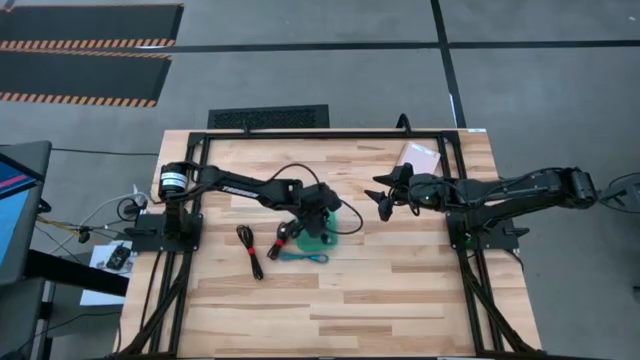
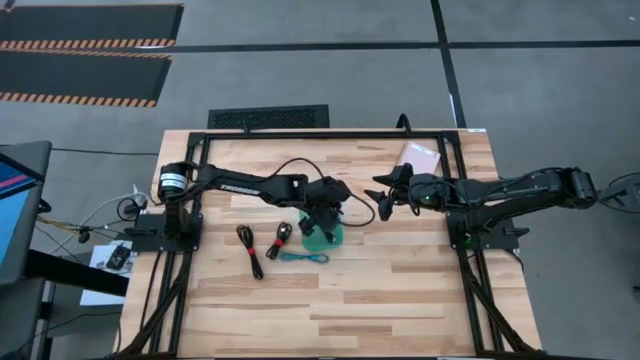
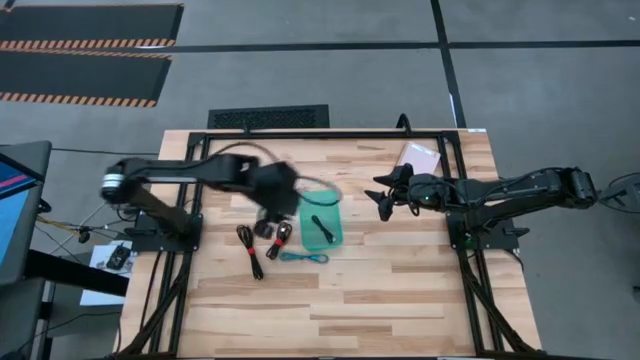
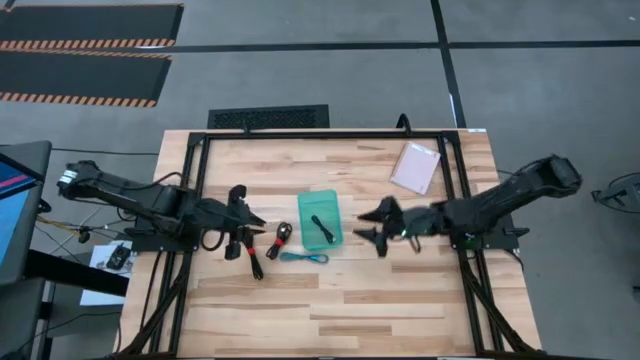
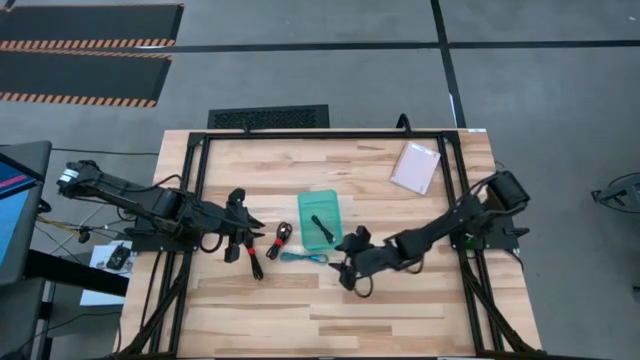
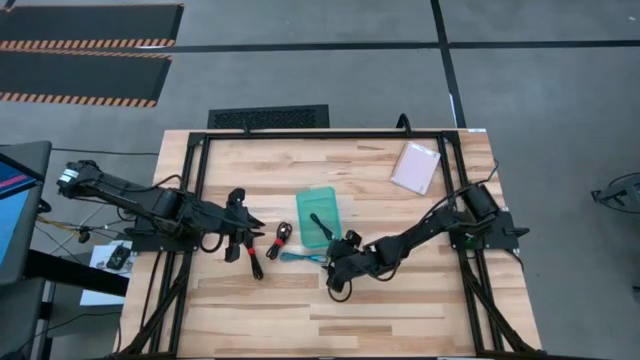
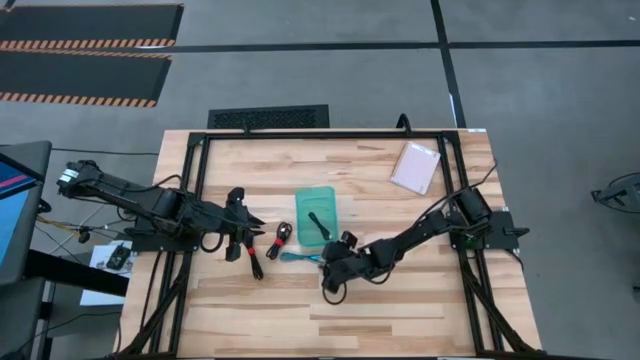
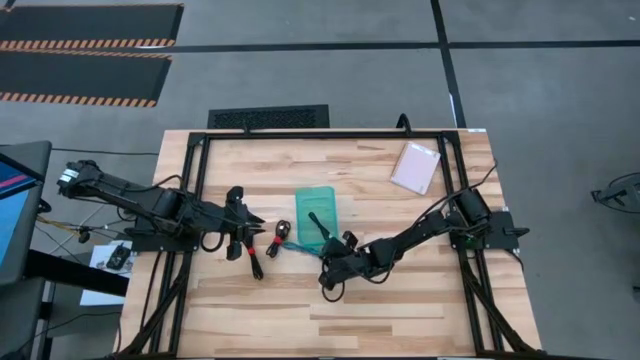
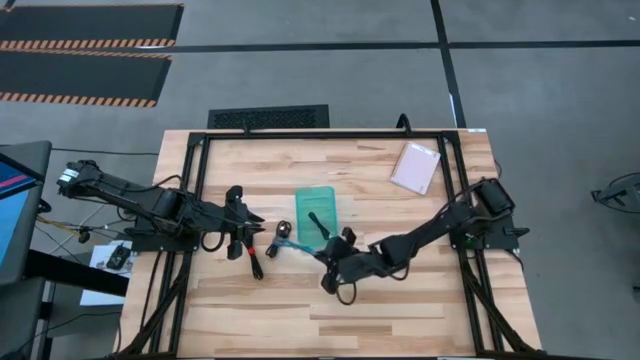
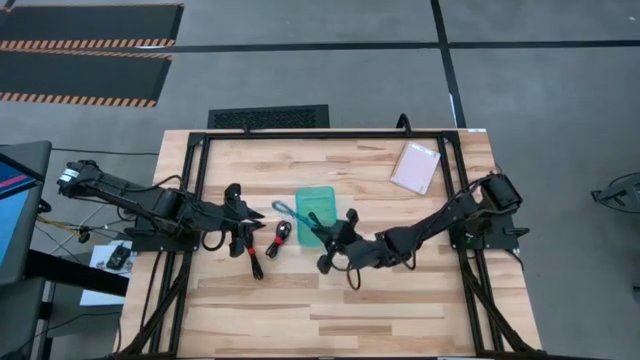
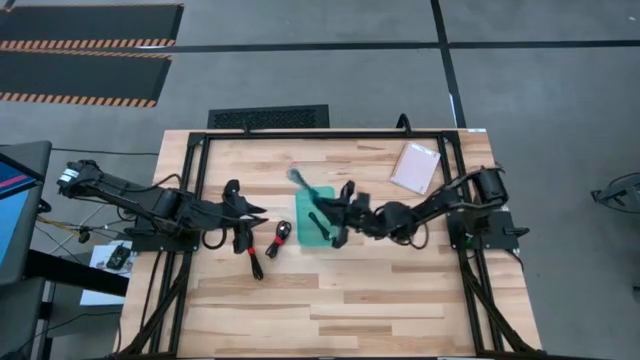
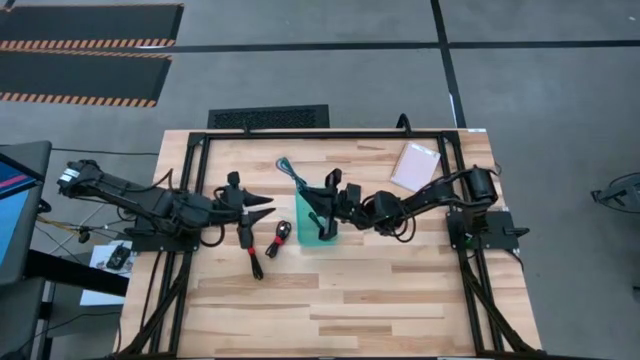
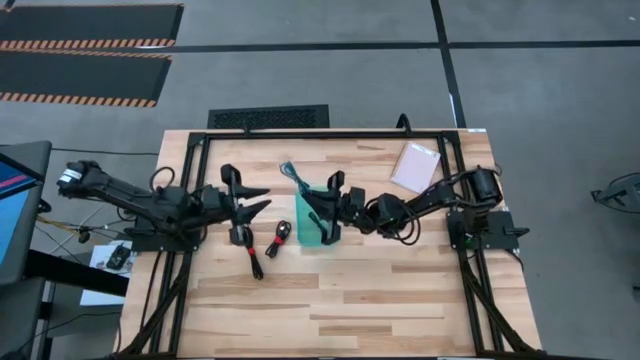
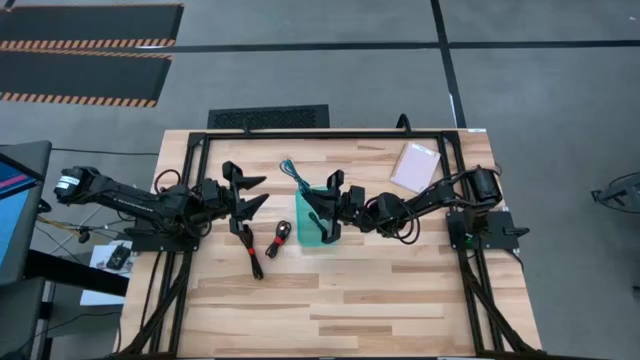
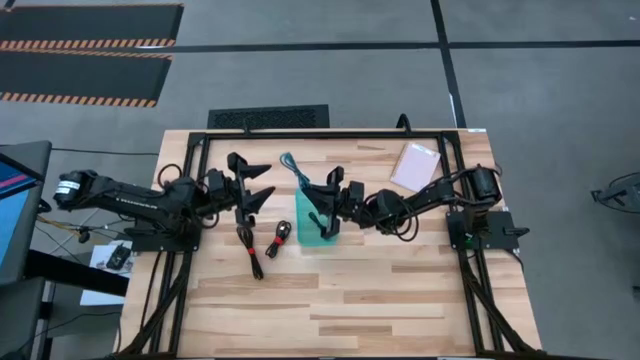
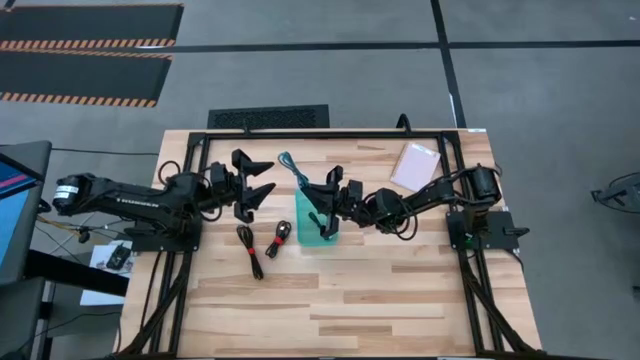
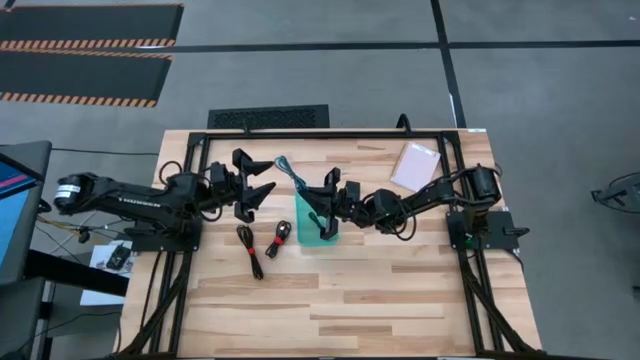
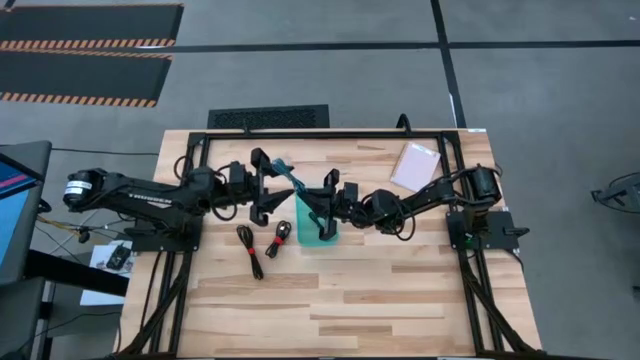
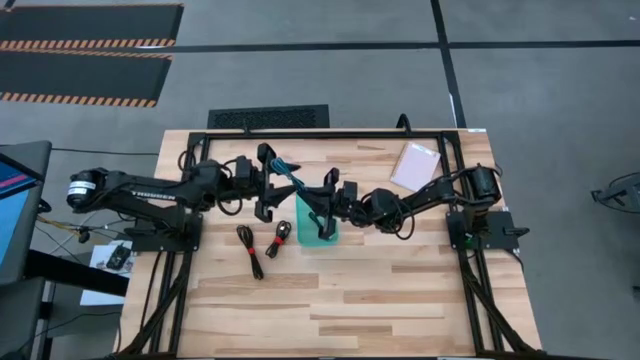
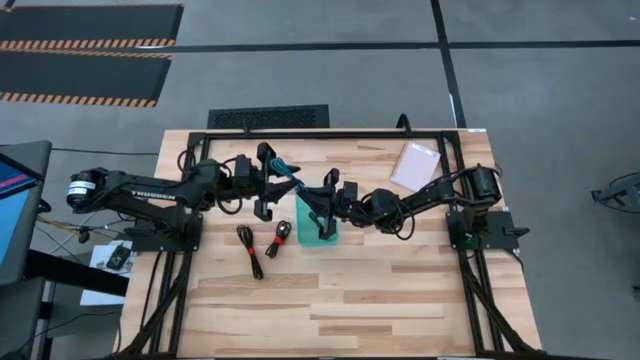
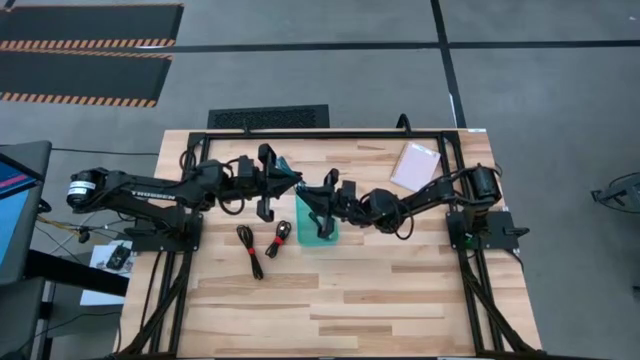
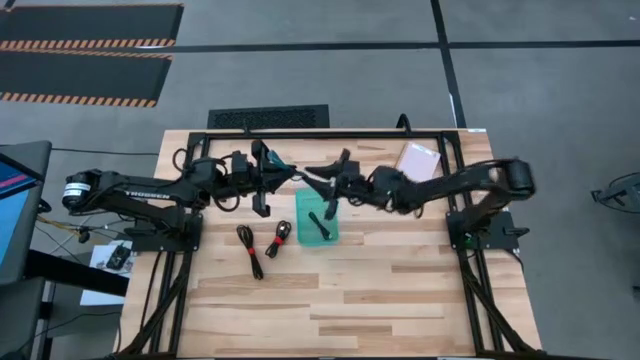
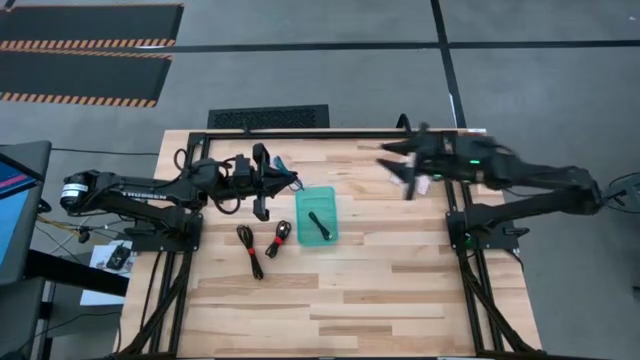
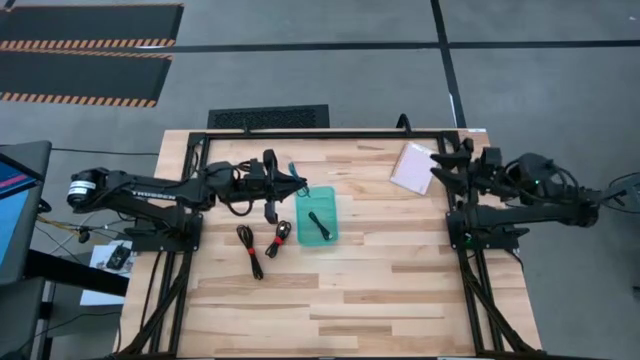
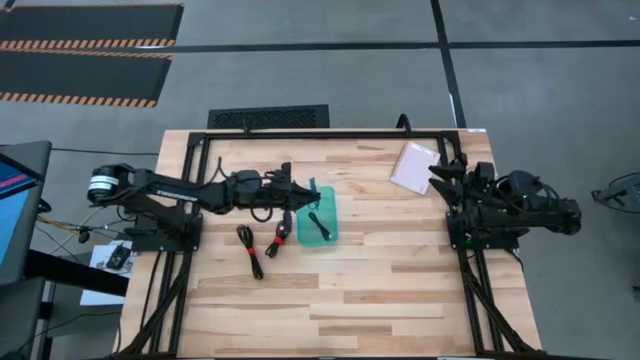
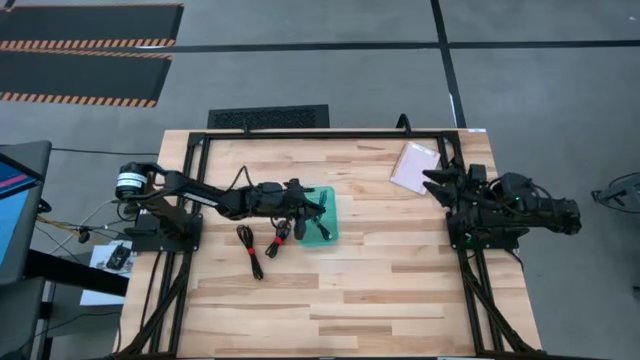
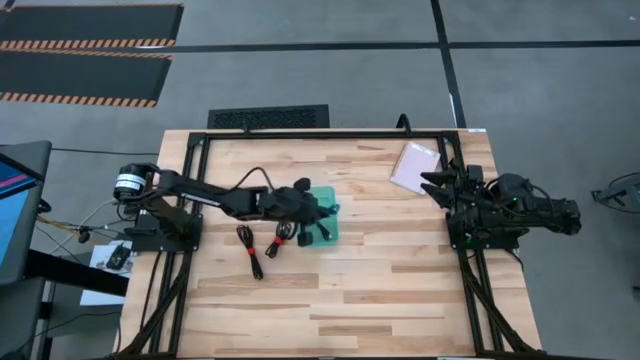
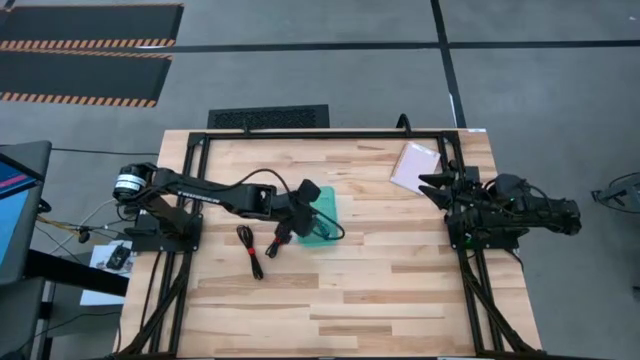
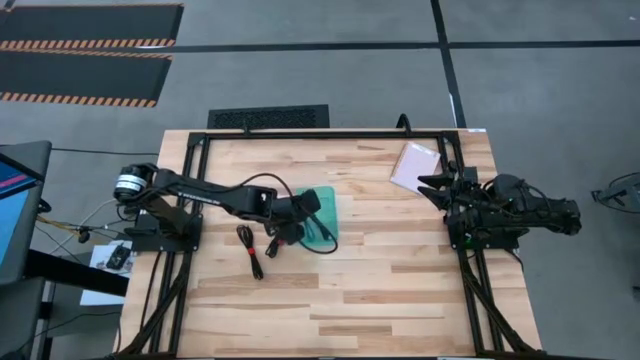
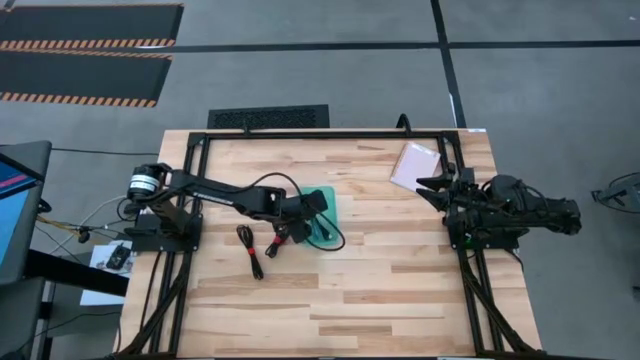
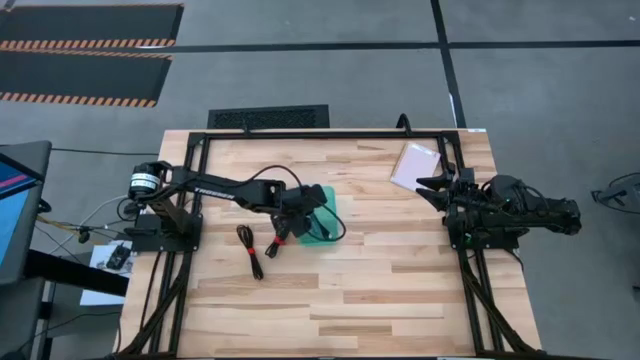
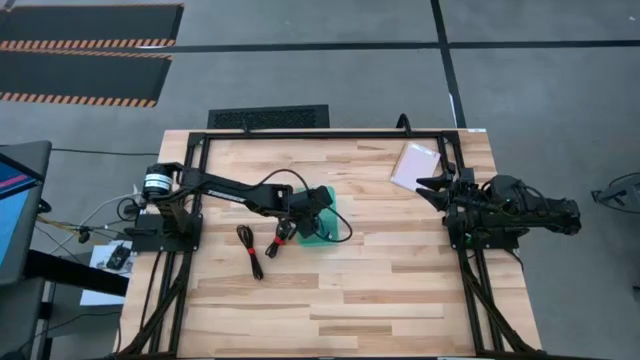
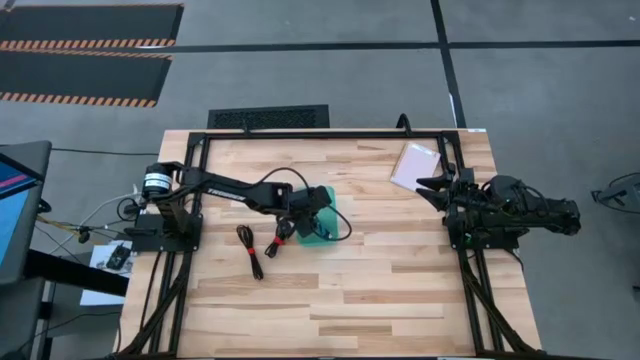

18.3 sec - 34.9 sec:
Task: Pick and place USB-C Cables
Put the blue charger cable into the green bin

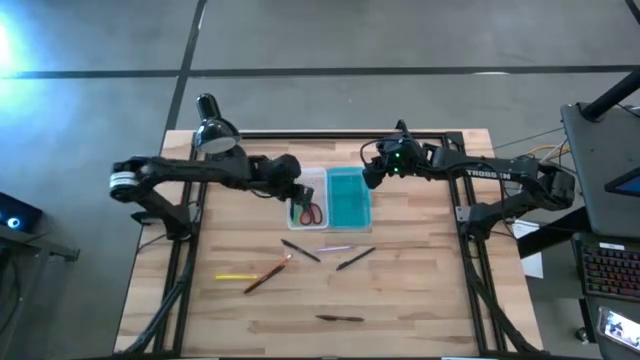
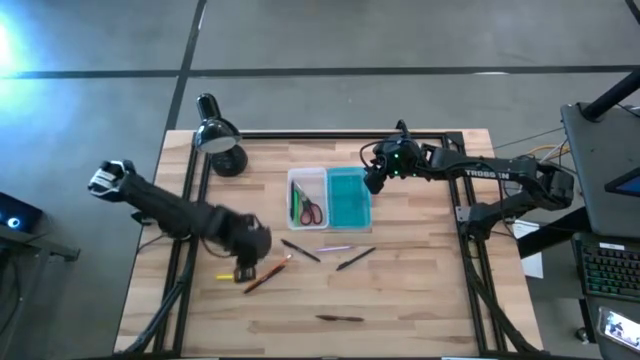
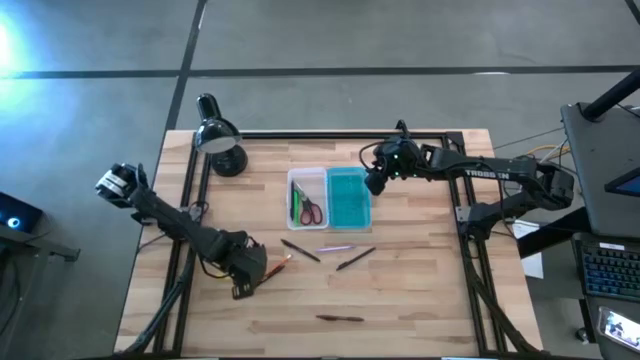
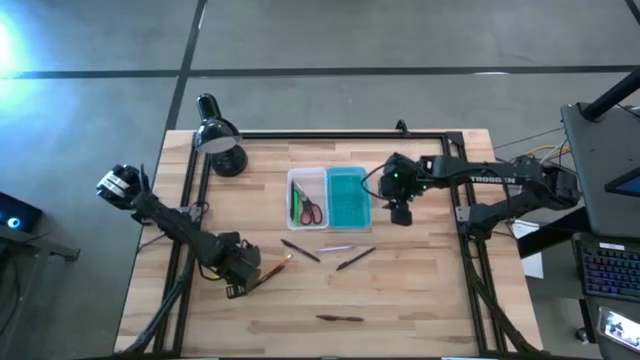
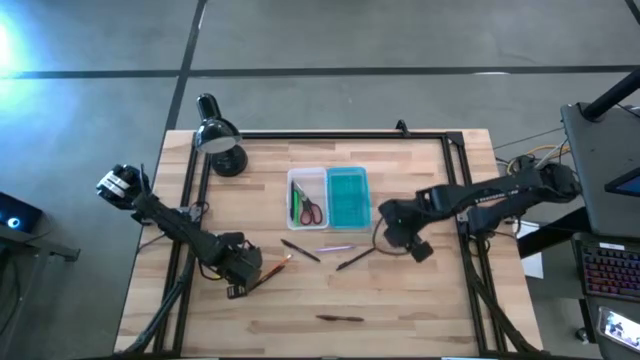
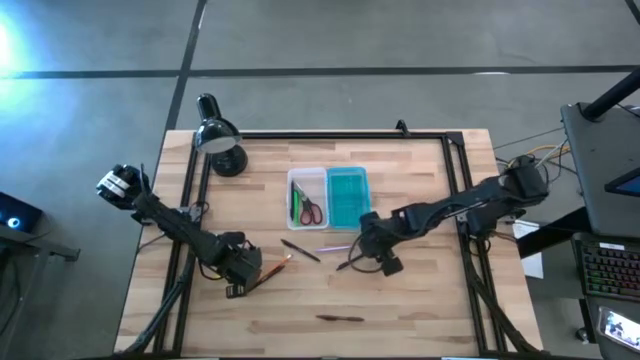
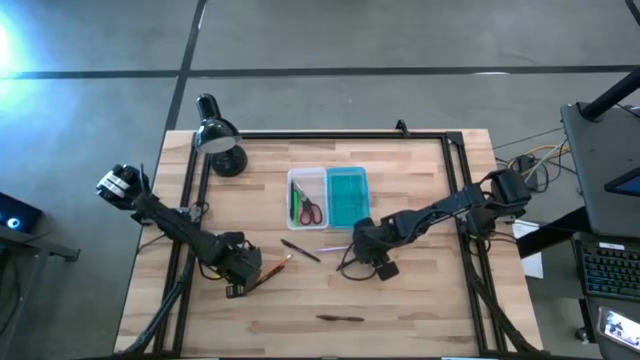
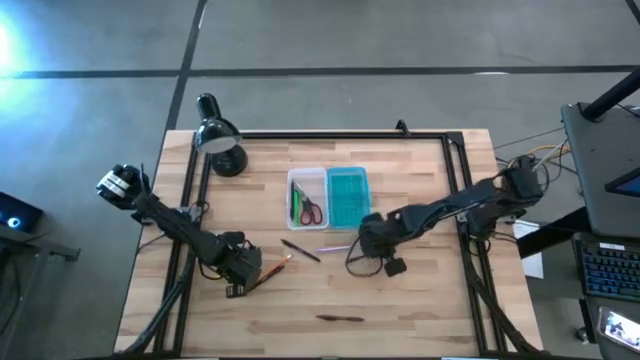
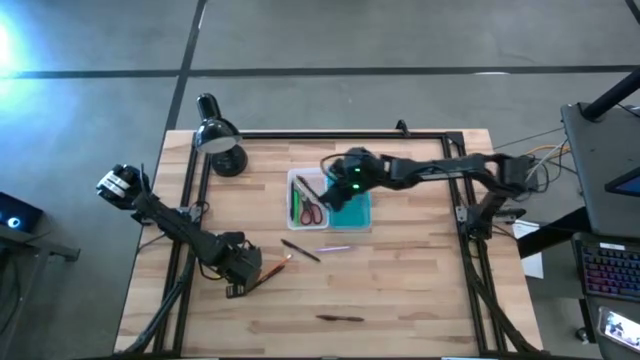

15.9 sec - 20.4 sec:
Task: Pick & place school supplies into a supply box
Put the right black pen into the supply box

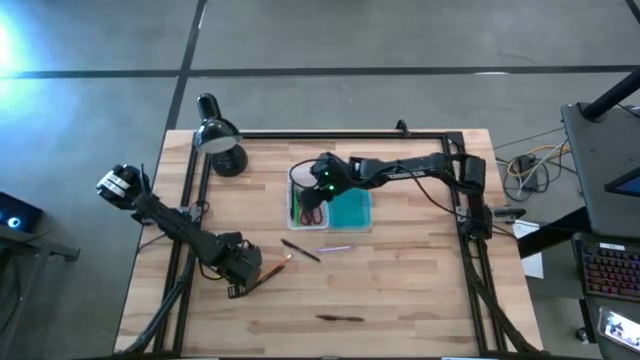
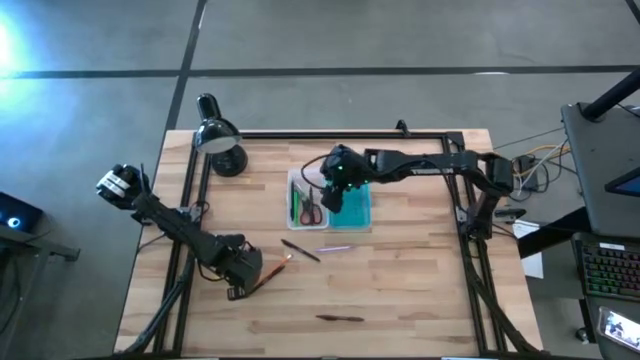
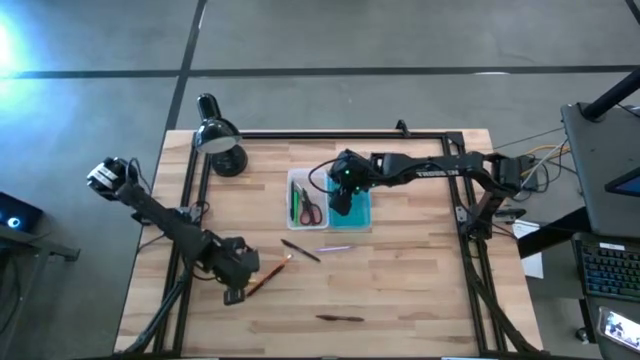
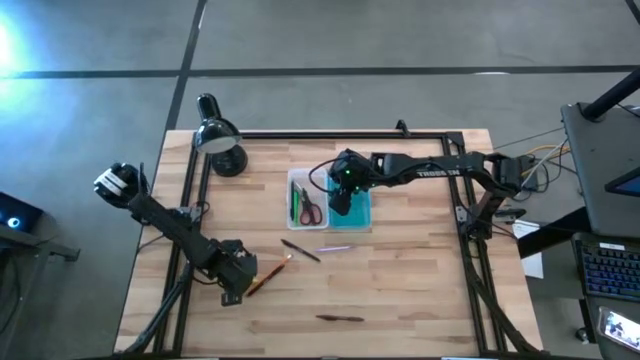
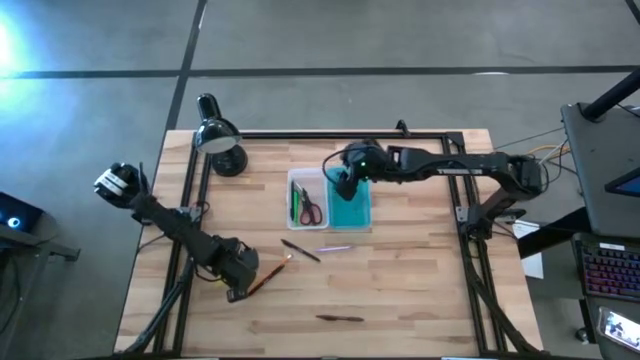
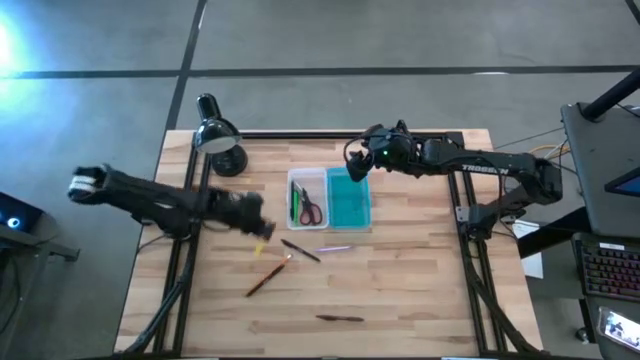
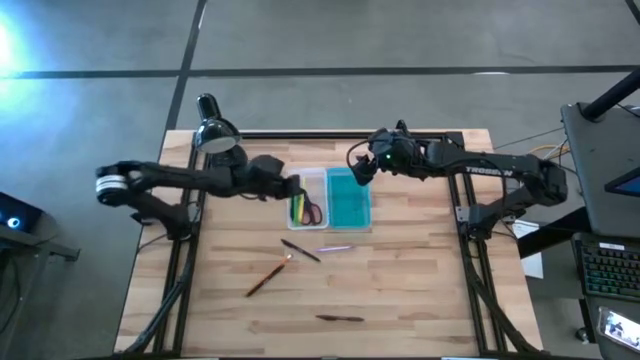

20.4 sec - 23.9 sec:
Put the yellow pen into the blue box
